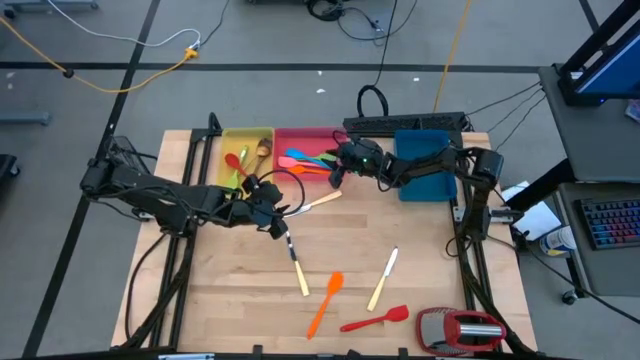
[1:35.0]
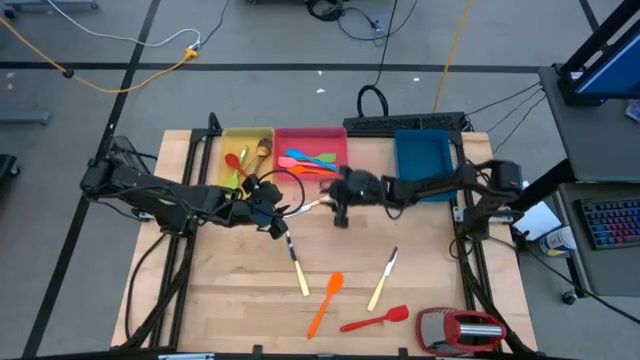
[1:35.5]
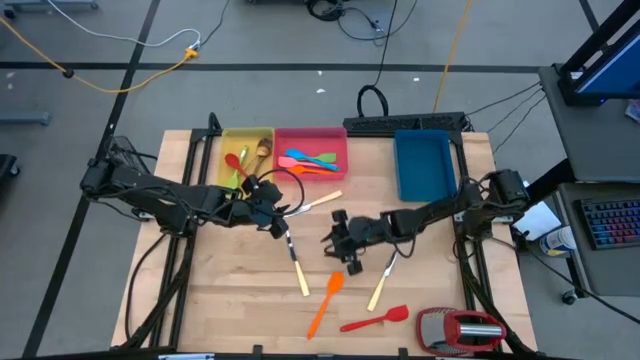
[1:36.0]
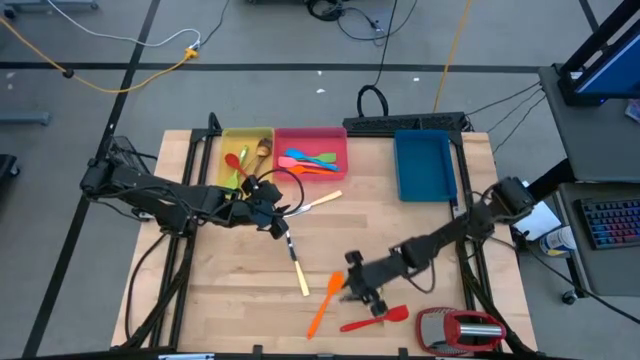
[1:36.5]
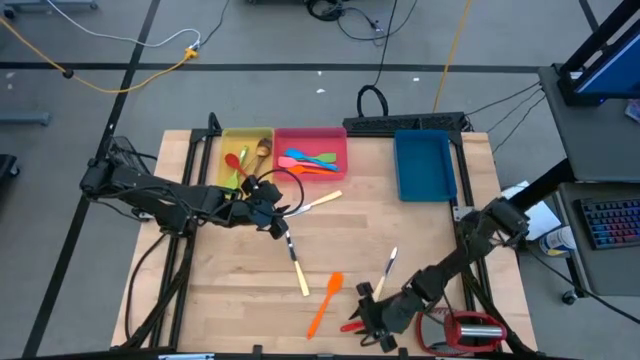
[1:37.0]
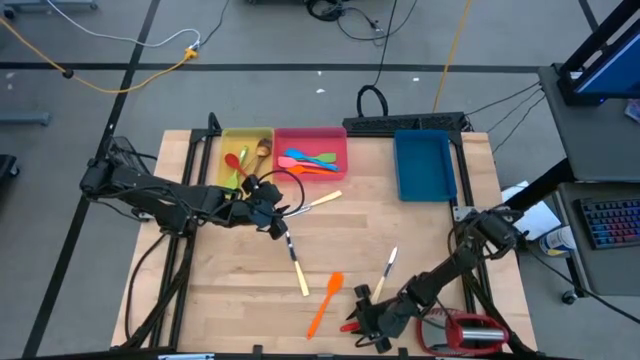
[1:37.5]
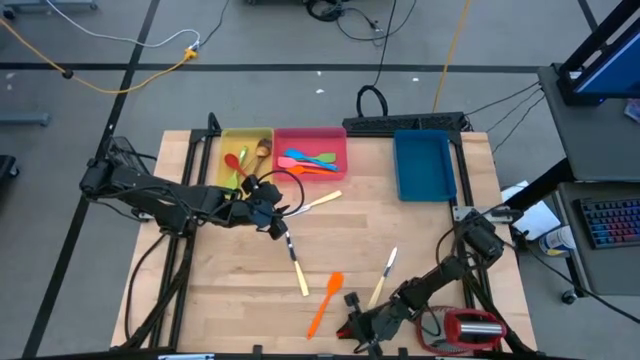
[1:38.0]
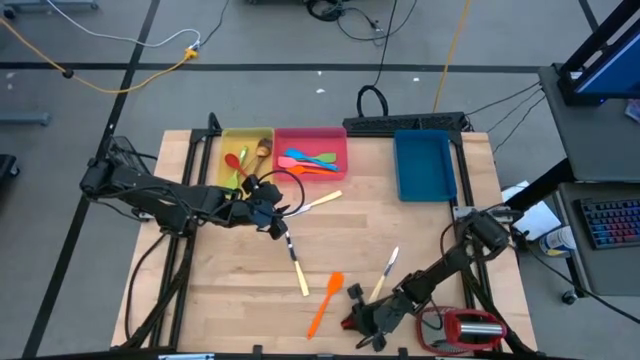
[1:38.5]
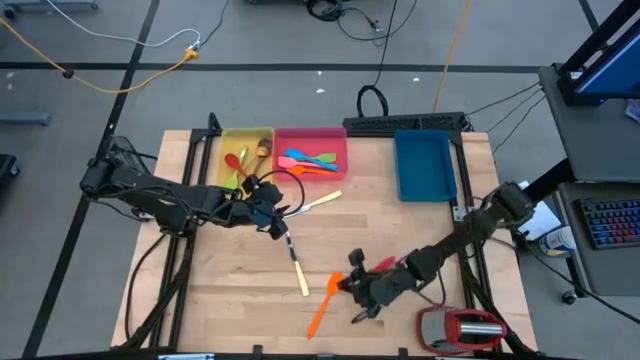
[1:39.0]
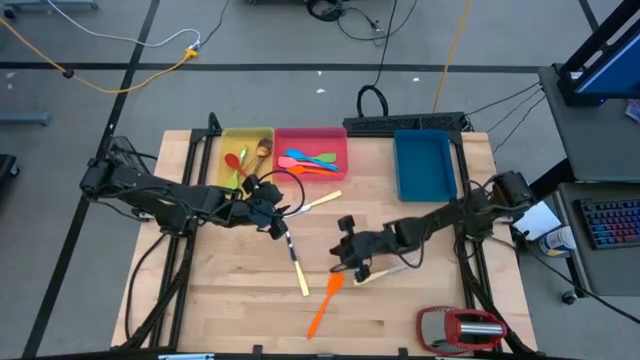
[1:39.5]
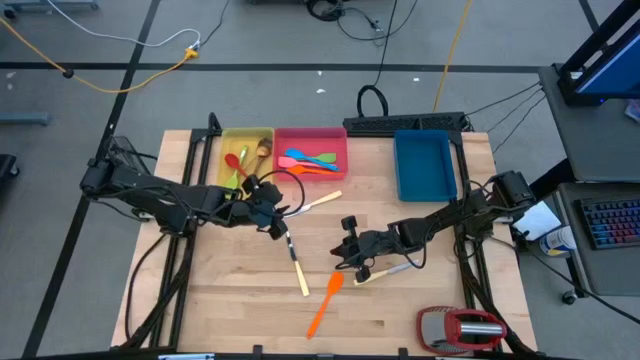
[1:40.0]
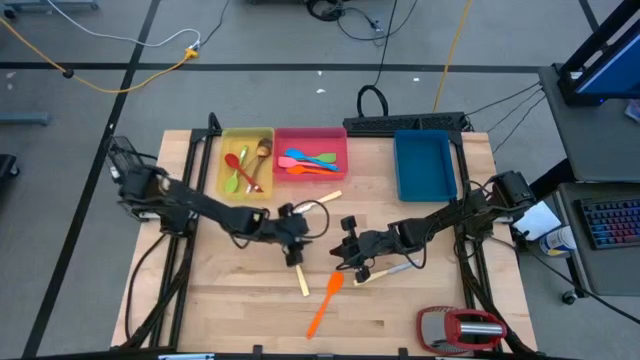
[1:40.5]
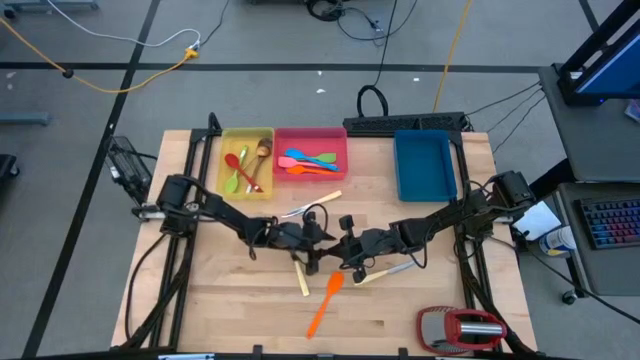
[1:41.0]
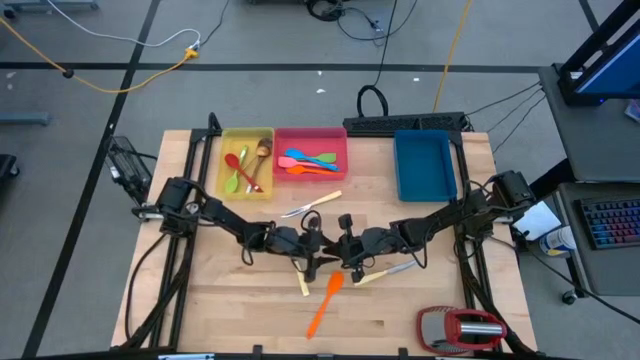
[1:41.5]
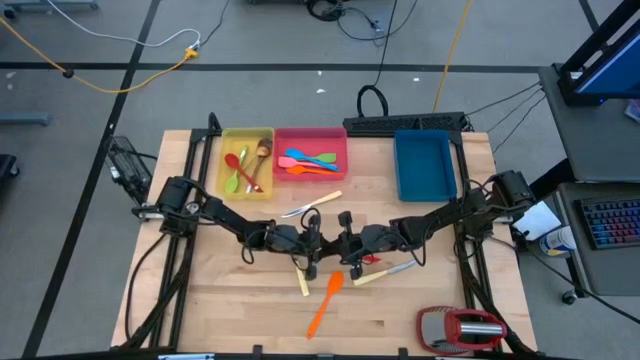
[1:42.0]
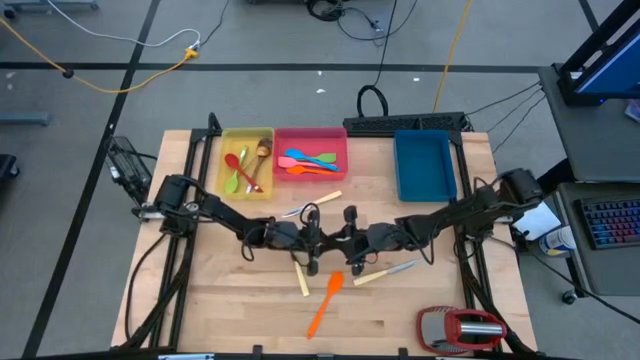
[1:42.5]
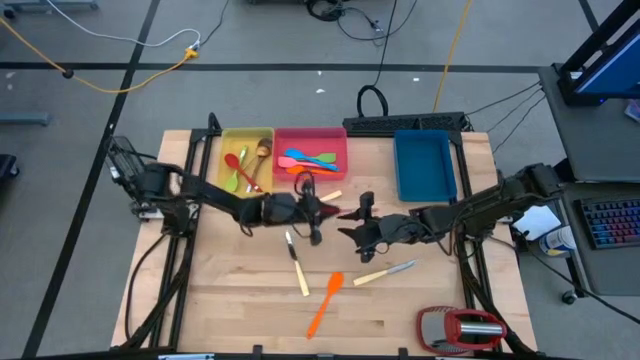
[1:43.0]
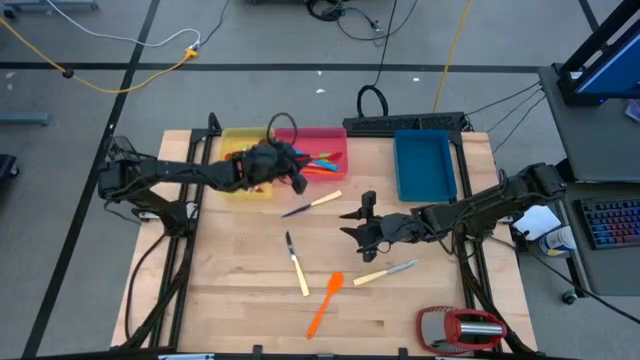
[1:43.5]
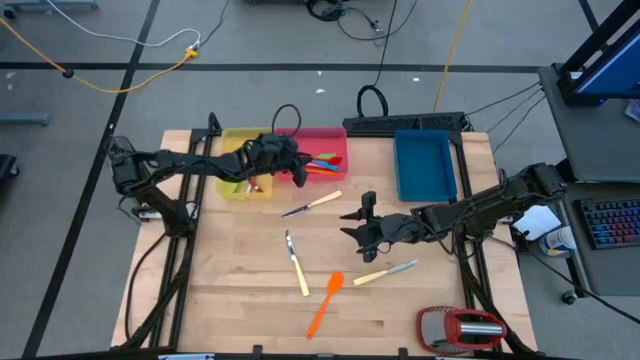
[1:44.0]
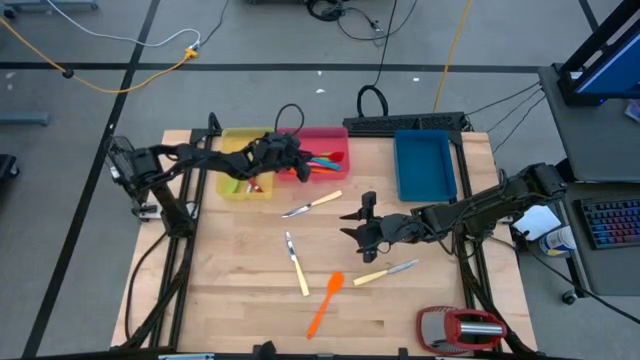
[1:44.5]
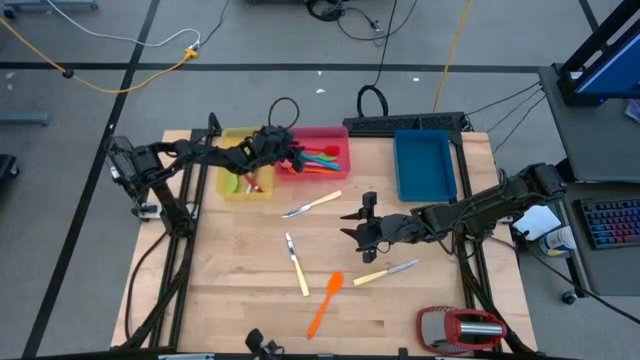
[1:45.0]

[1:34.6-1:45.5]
Task: Pick & Place Kitchen Items
Put the red spatula into the red bin

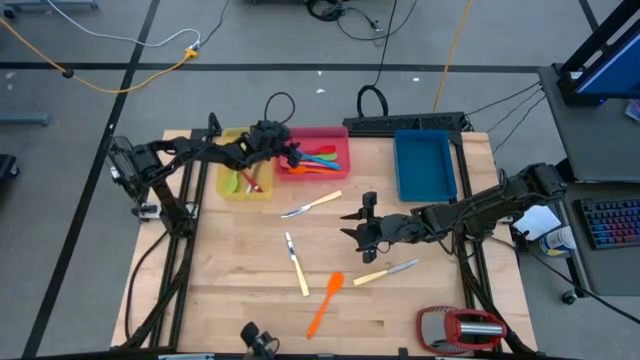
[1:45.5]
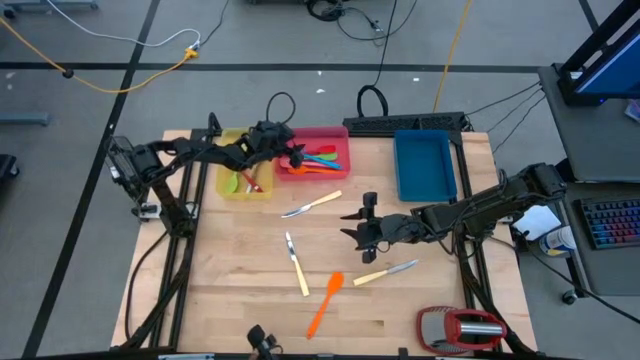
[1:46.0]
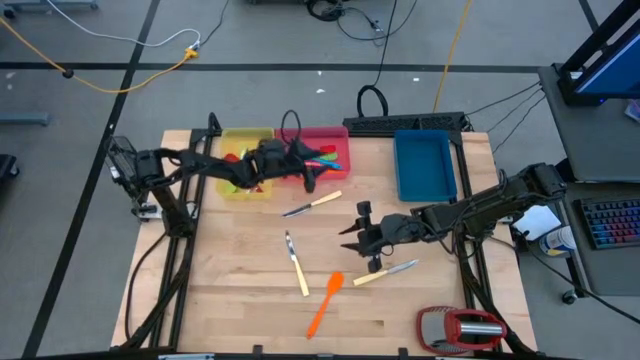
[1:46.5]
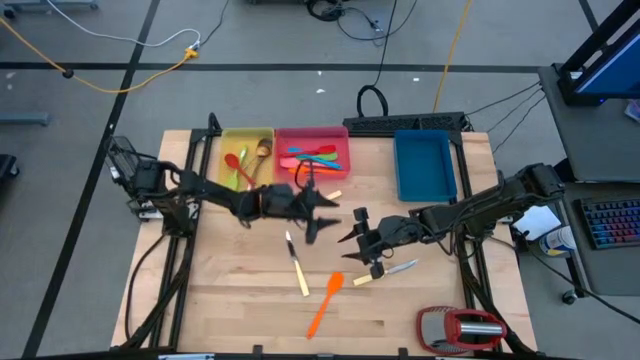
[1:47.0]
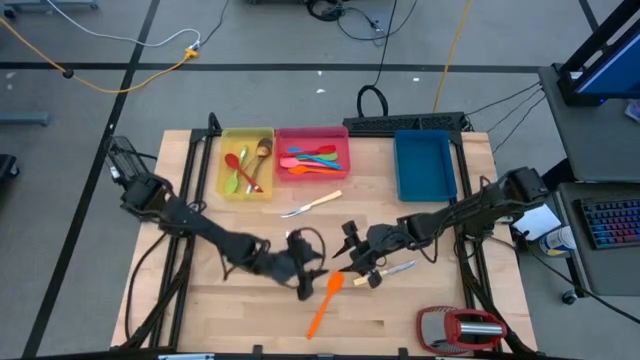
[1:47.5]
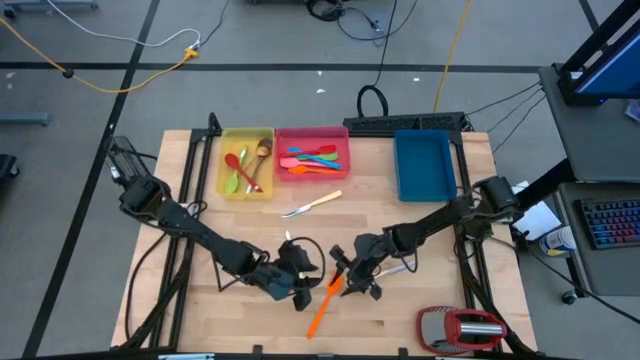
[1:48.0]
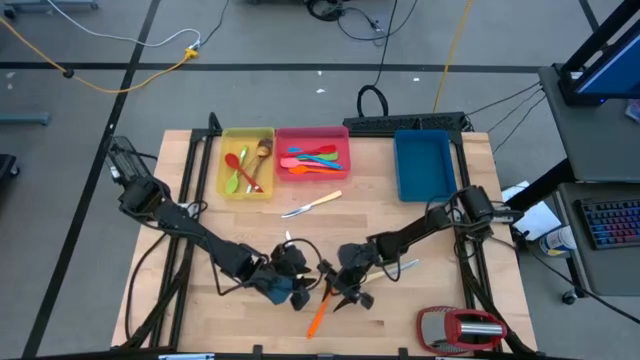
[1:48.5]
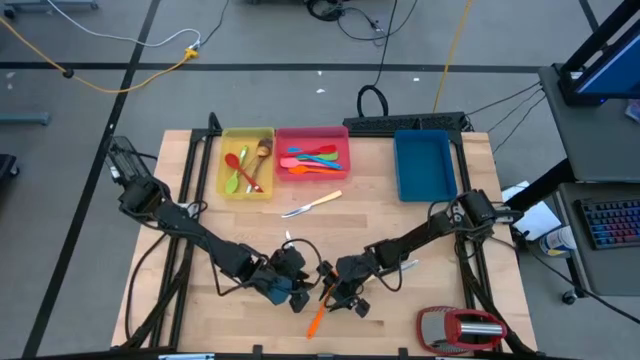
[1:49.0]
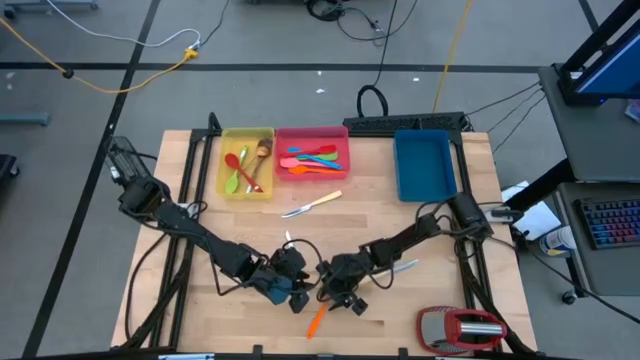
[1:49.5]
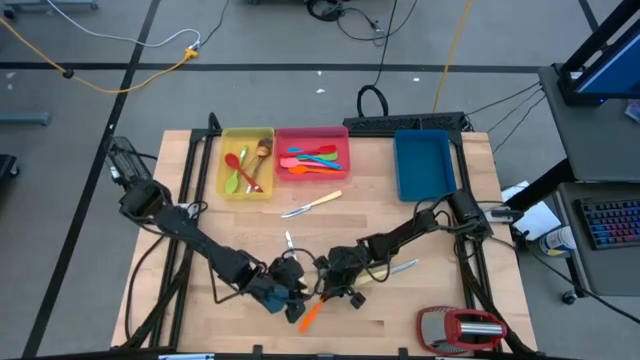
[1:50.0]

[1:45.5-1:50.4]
Put the orange spatula into the red bin

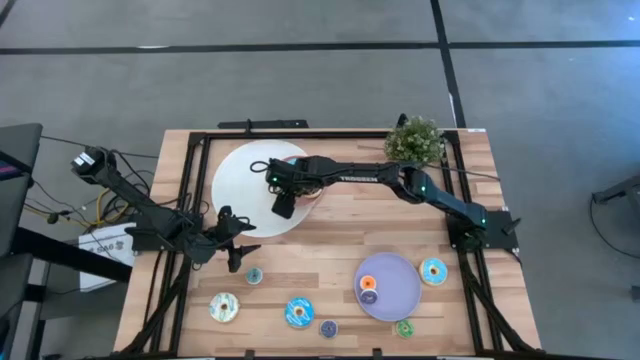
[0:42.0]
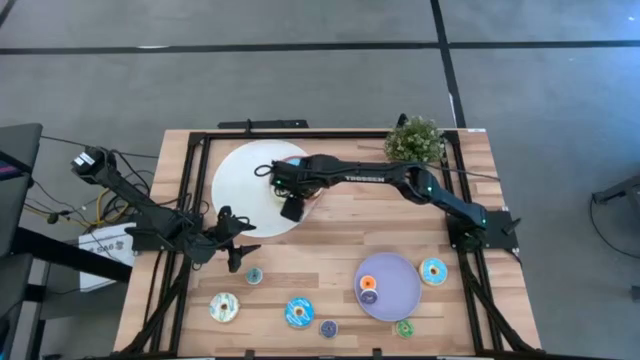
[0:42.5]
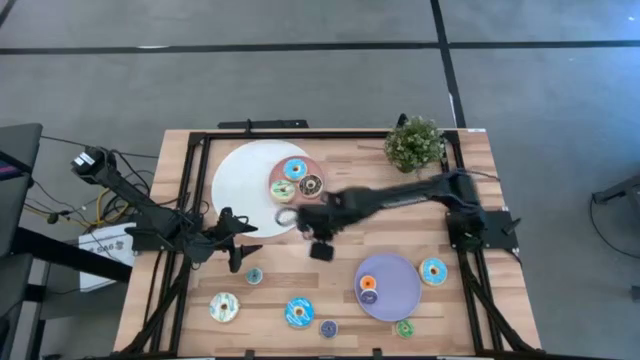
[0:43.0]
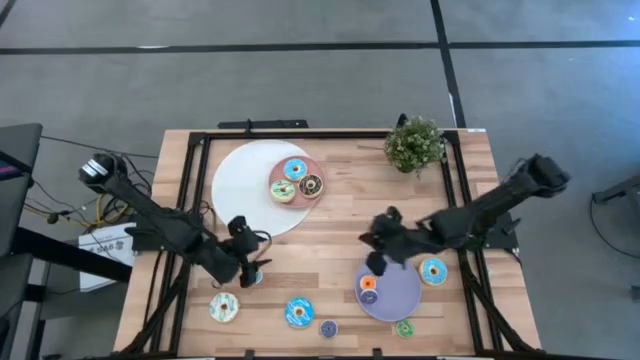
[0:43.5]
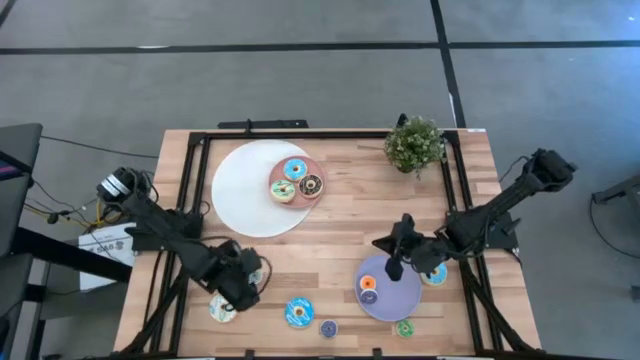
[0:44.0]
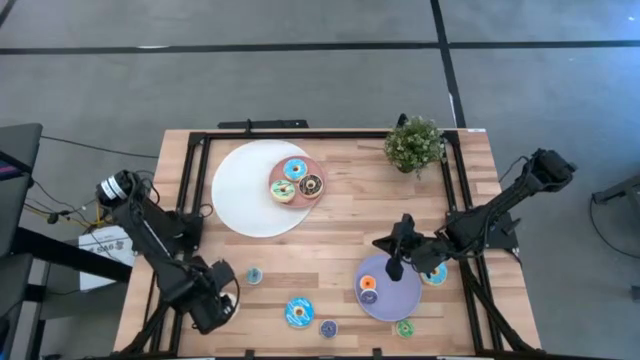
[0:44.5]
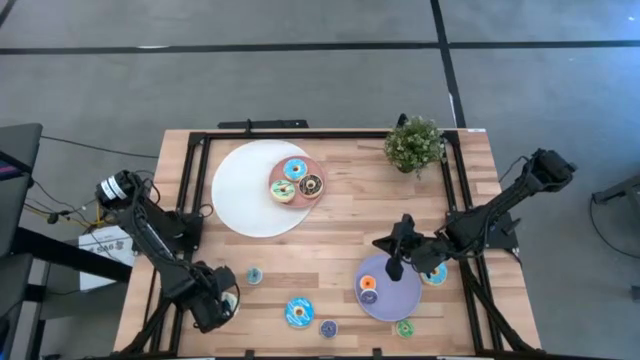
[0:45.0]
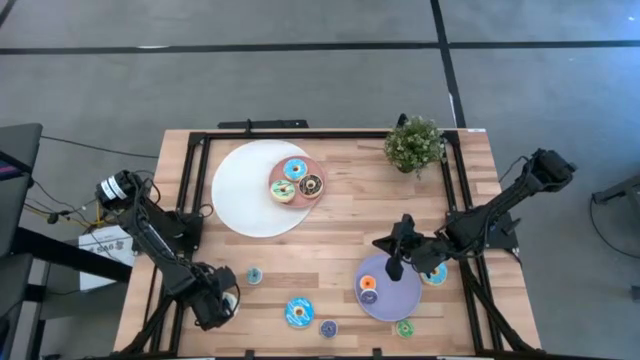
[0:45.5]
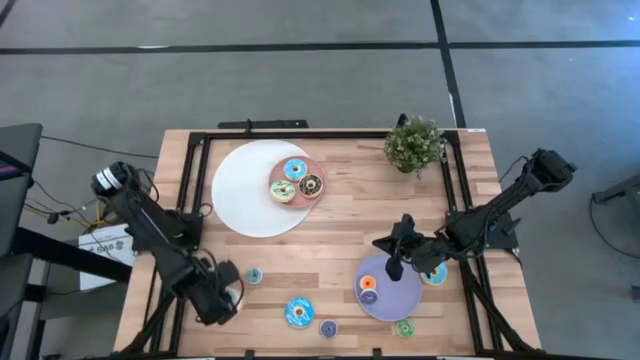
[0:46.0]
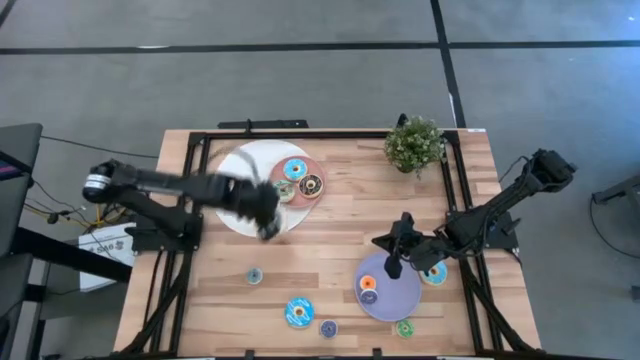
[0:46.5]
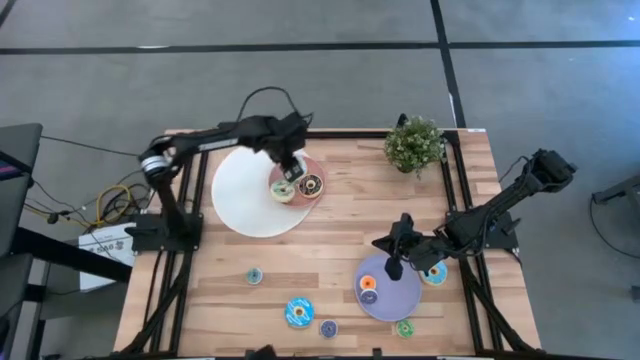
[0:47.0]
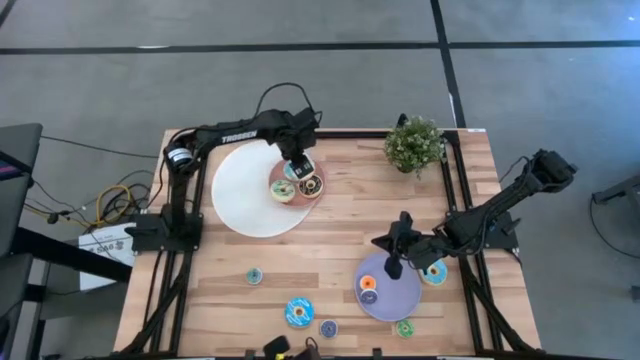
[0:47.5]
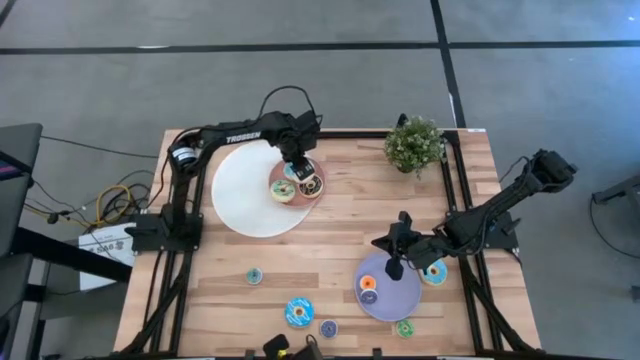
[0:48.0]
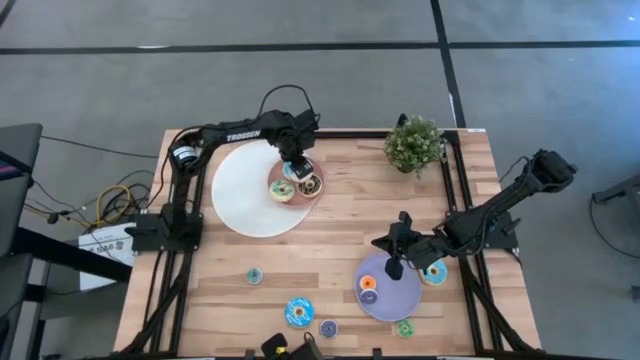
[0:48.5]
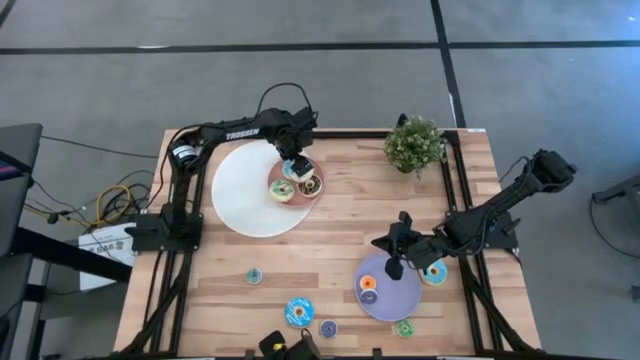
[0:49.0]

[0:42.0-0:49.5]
Task: Pick & Place donuts
Put the large white donut on the pink plate
